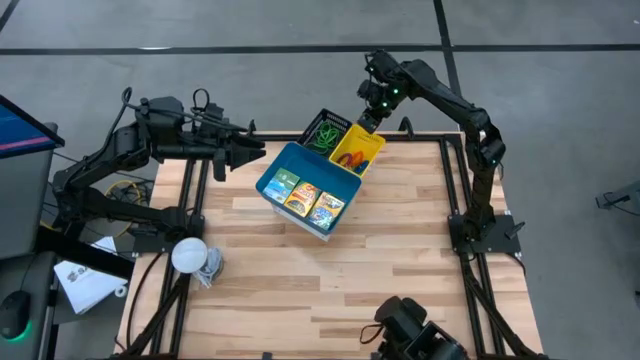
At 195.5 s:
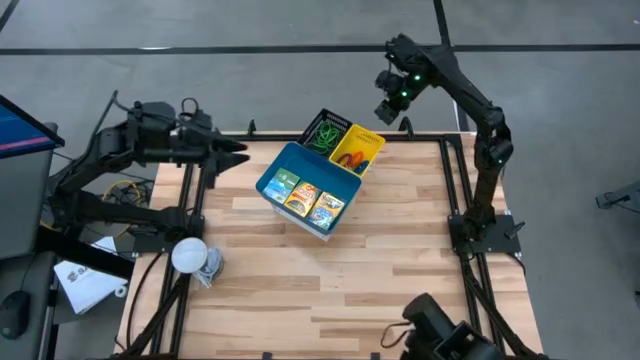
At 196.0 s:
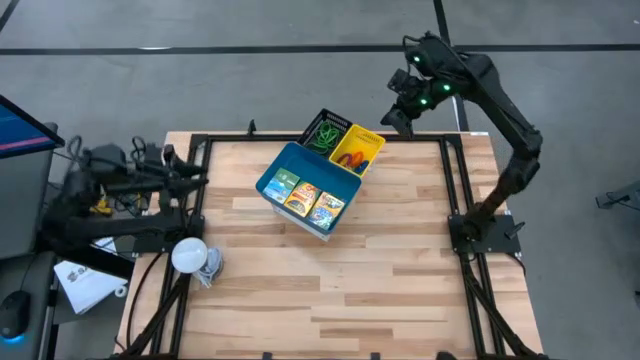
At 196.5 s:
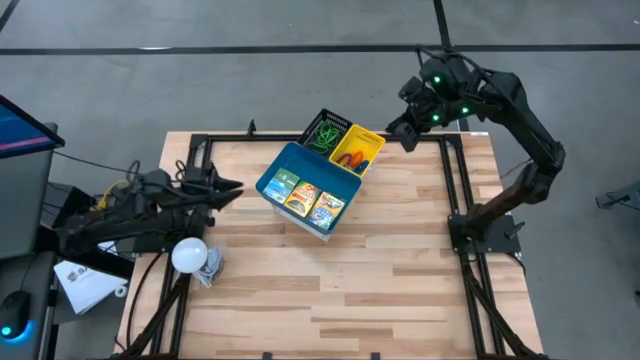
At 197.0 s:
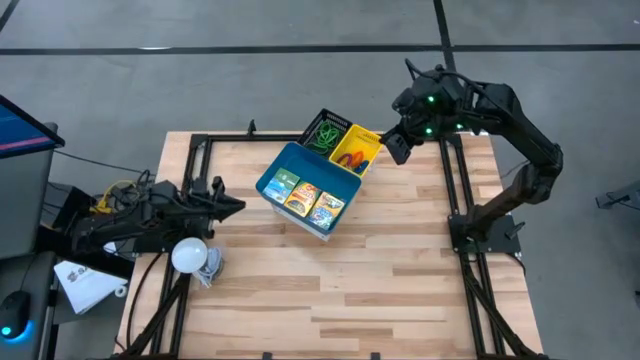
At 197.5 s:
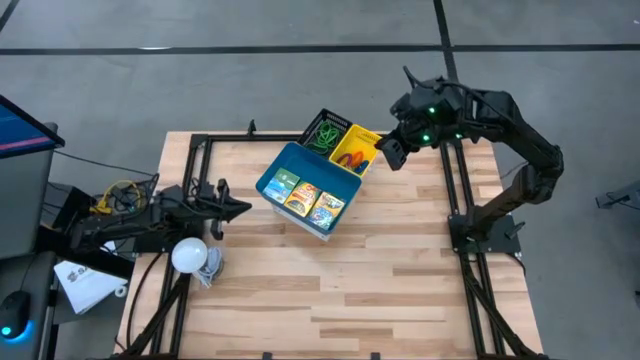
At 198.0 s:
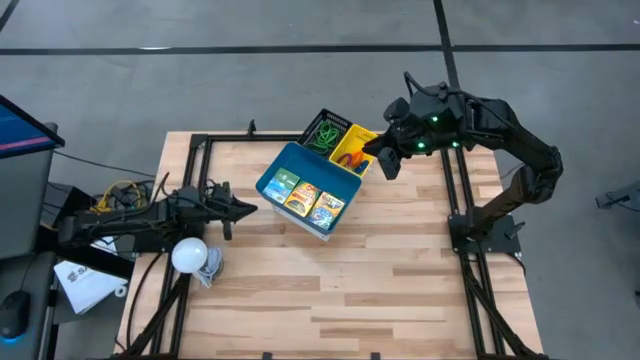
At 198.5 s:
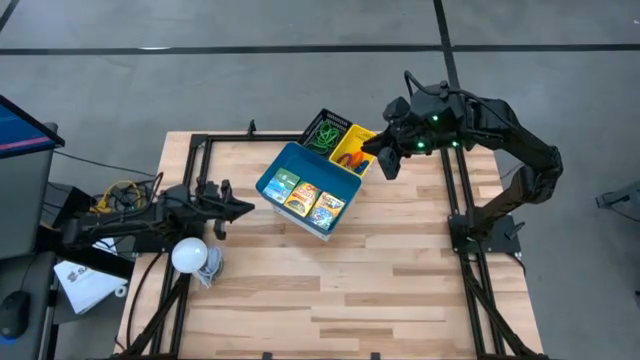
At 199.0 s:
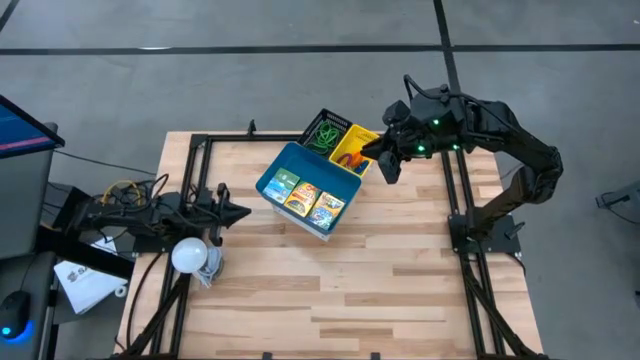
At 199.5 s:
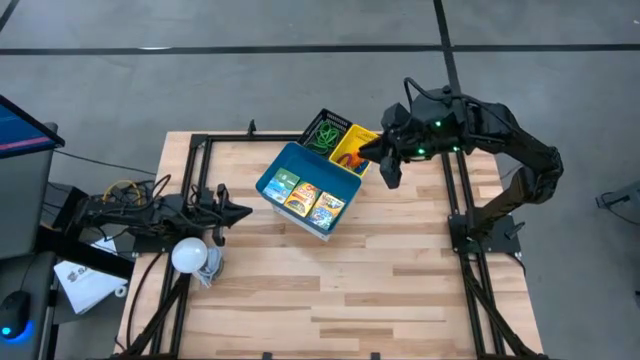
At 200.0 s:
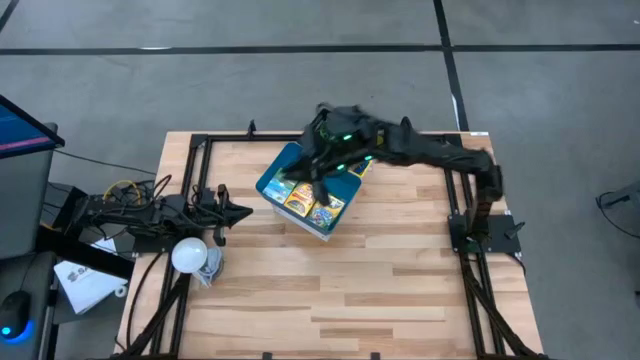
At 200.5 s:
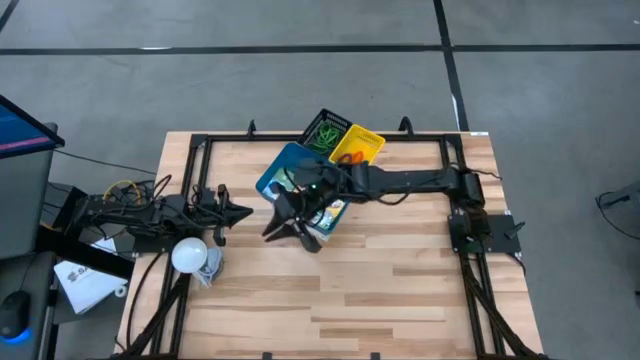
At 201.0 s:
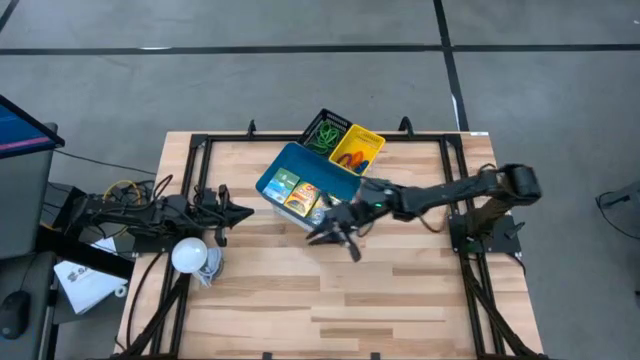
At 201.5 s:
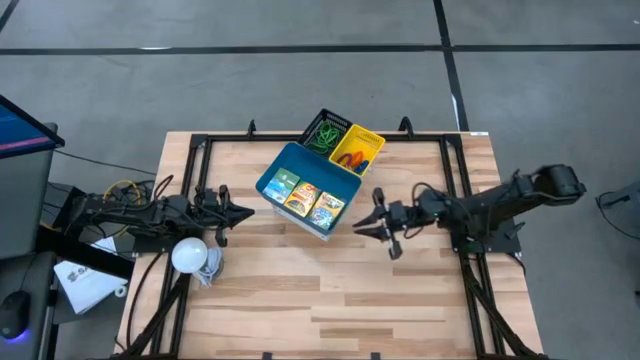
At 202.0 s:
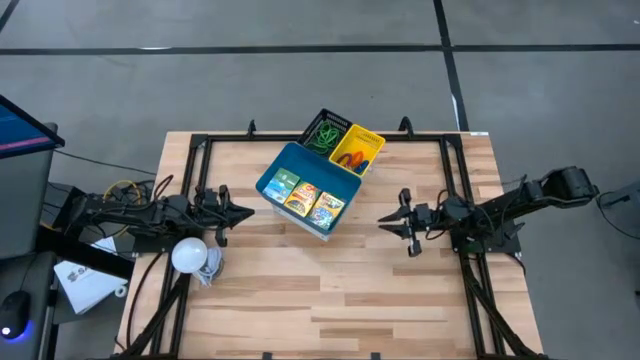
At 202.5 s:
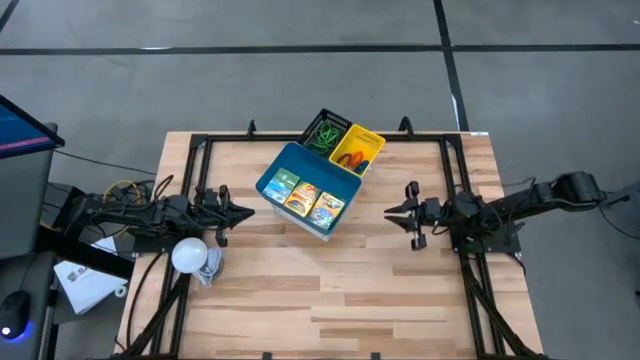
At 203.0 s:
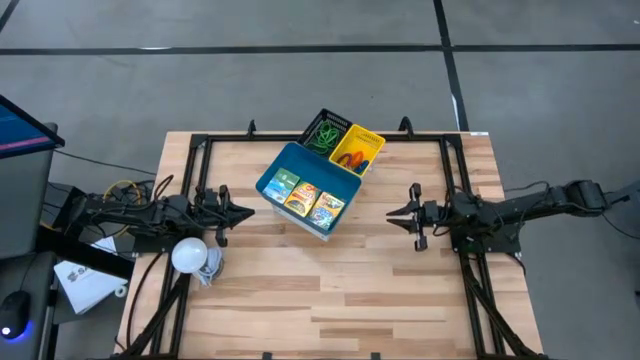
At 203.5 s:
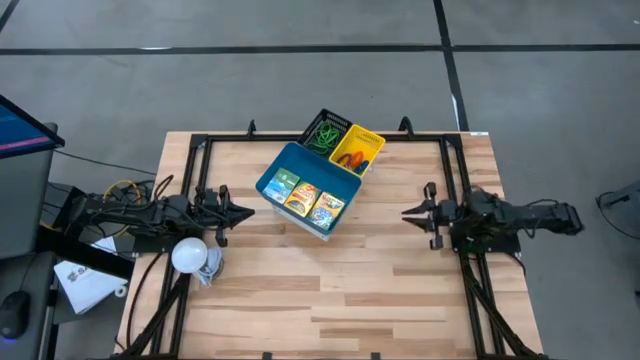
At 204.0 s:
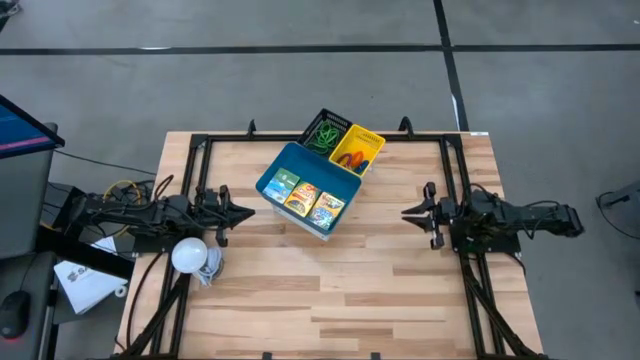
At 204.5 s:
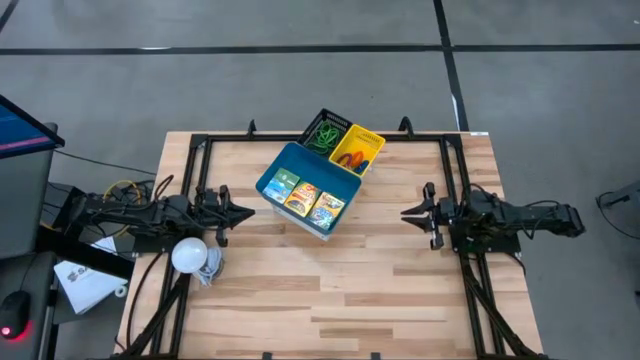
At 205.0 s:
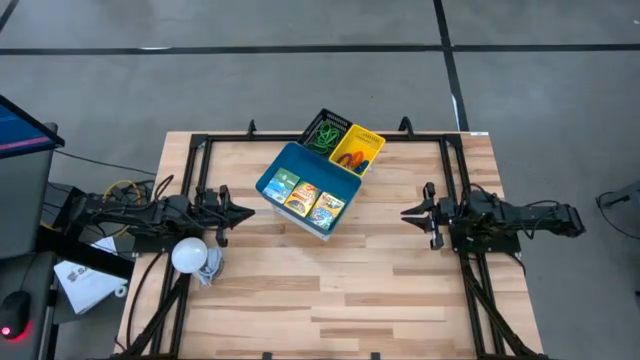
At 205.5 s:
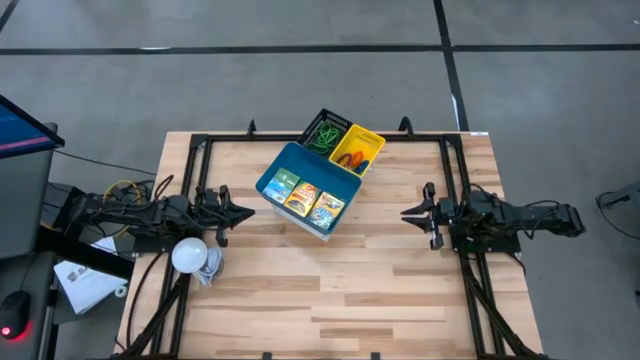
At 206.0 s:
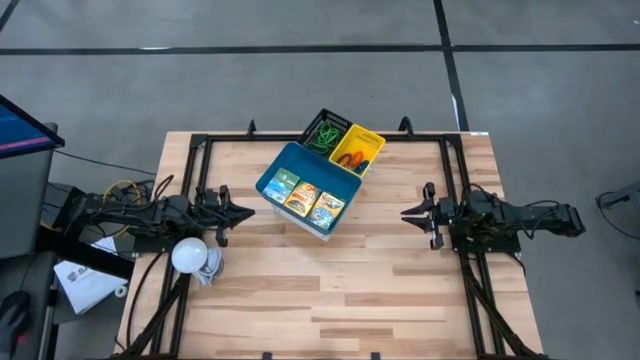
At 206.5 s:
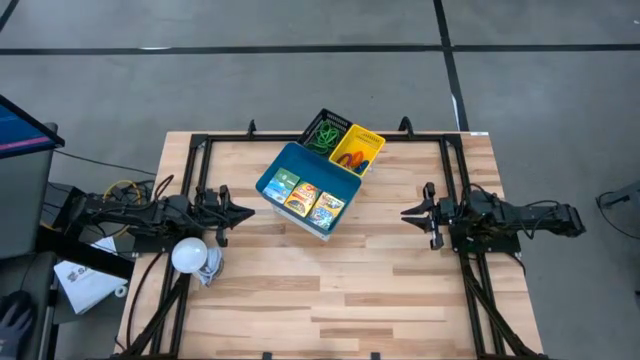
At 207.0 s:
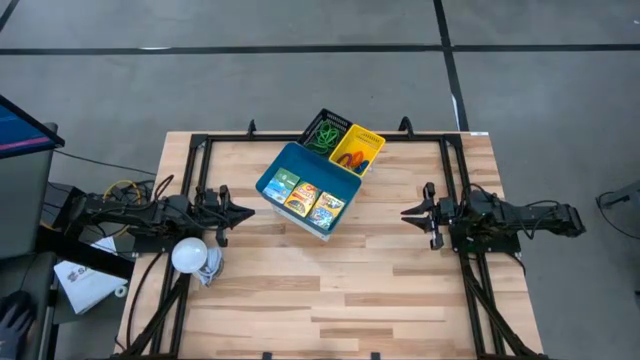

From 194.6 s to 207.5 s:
Task: Pick & Place Office Desk Supplies
Return to Home Position

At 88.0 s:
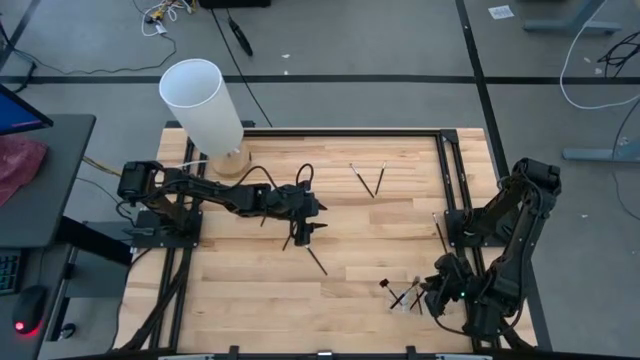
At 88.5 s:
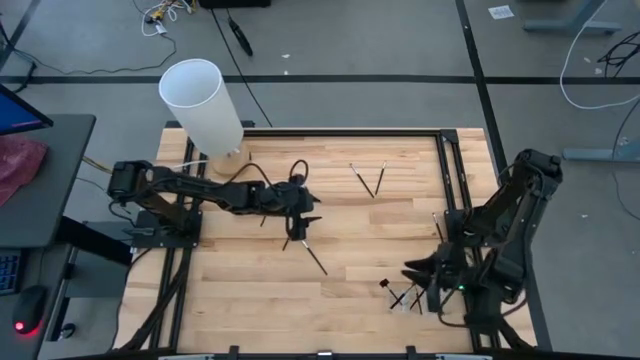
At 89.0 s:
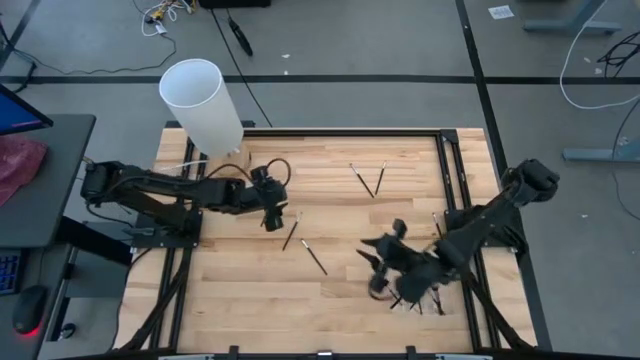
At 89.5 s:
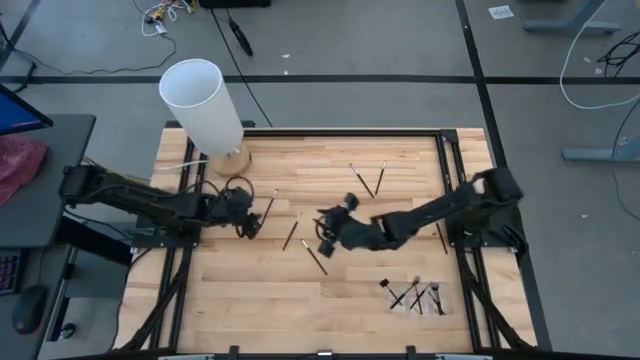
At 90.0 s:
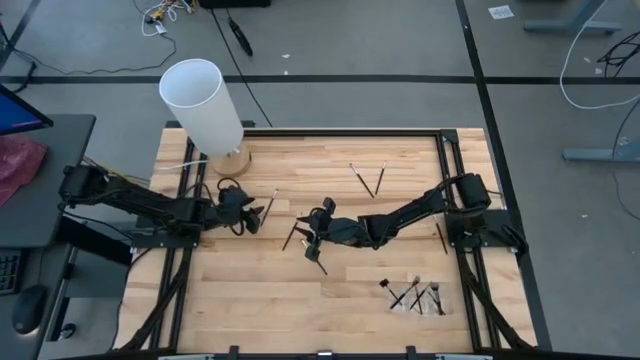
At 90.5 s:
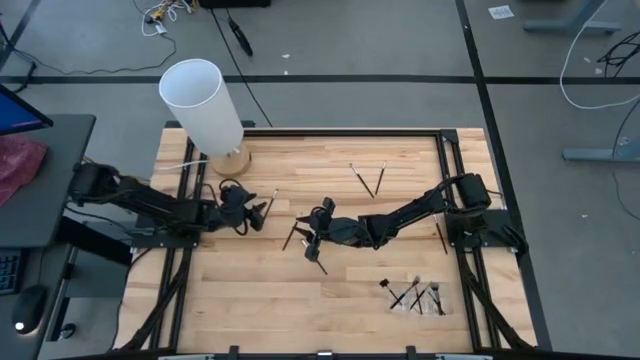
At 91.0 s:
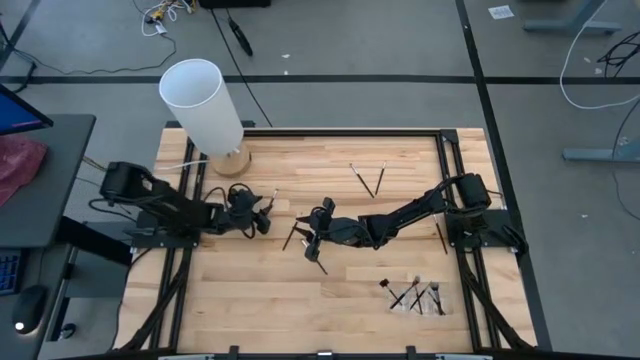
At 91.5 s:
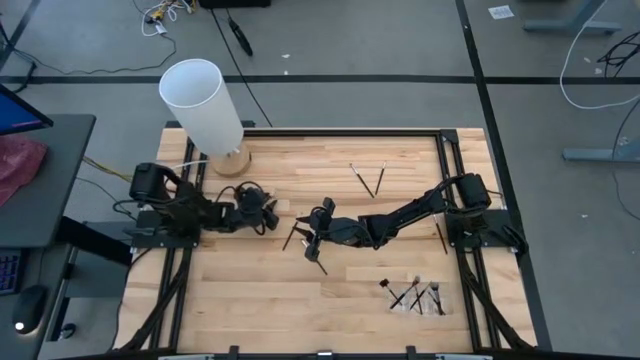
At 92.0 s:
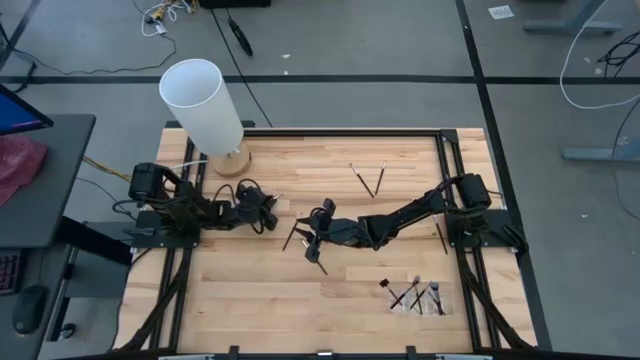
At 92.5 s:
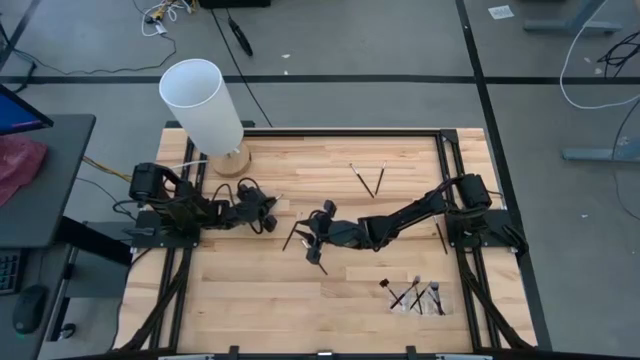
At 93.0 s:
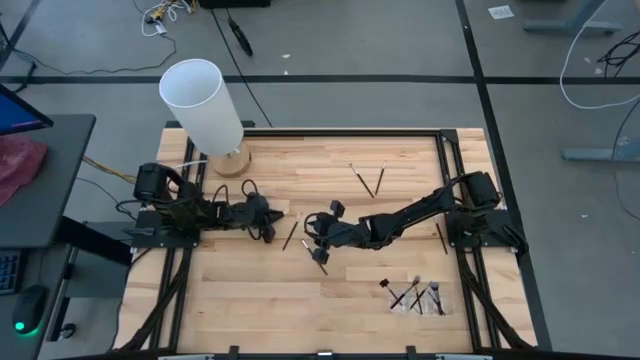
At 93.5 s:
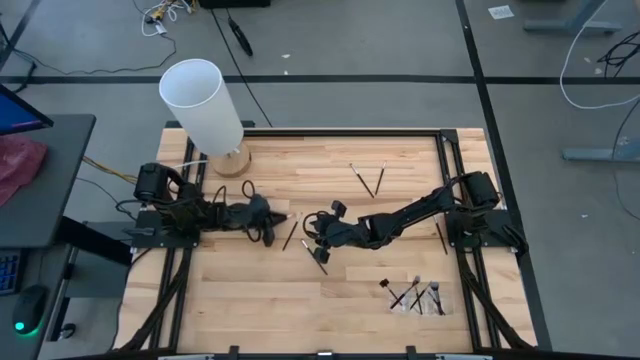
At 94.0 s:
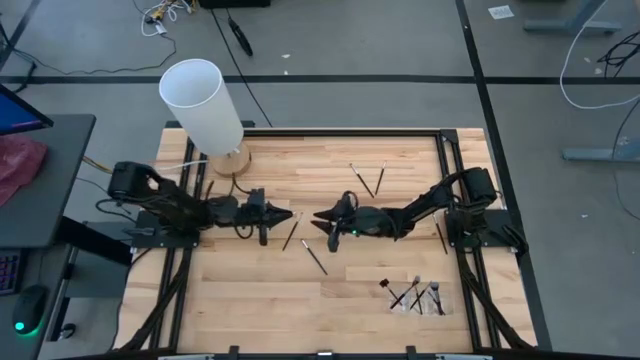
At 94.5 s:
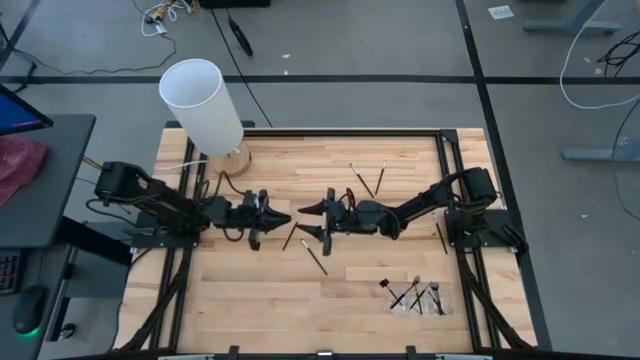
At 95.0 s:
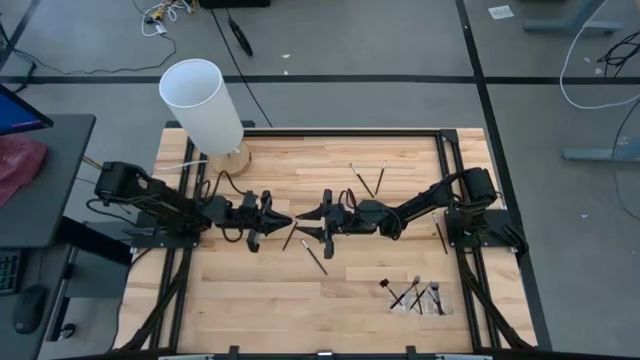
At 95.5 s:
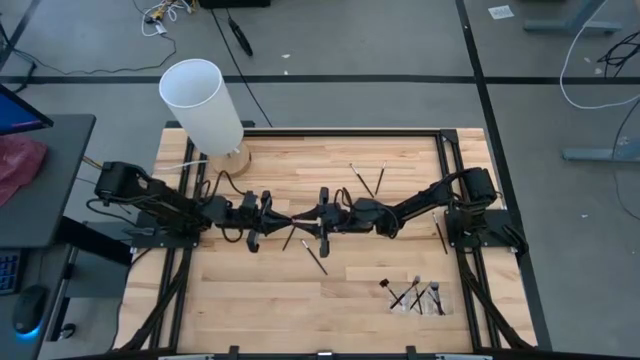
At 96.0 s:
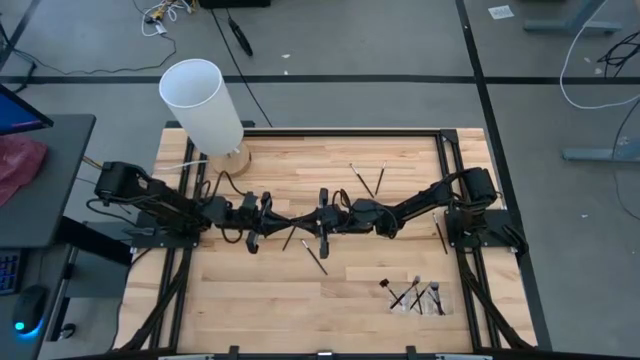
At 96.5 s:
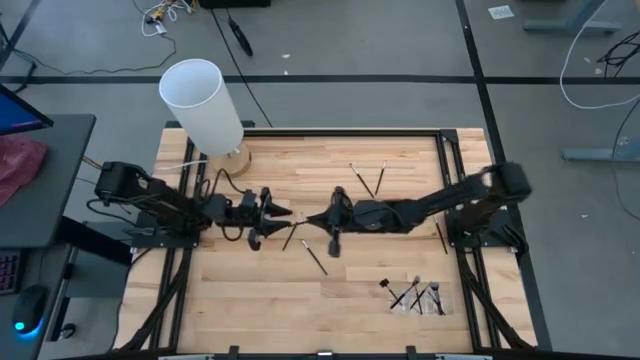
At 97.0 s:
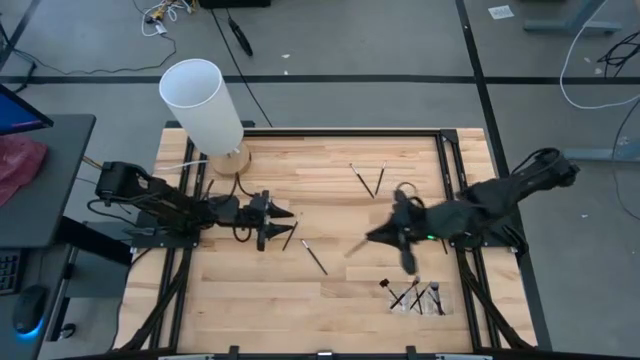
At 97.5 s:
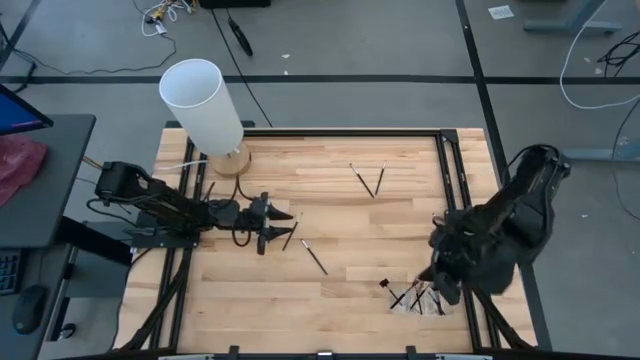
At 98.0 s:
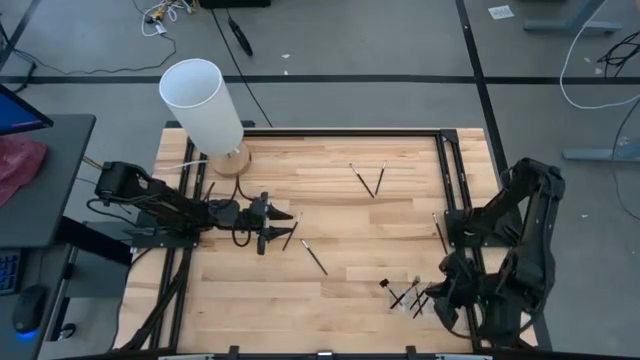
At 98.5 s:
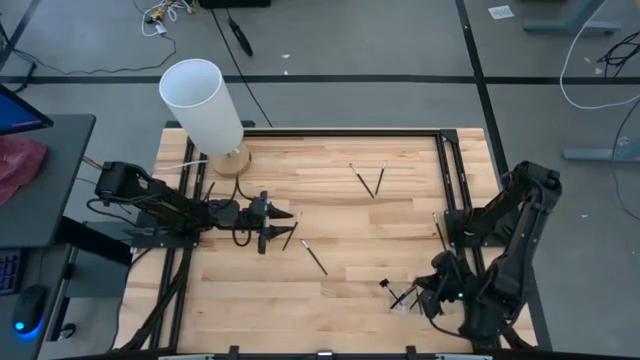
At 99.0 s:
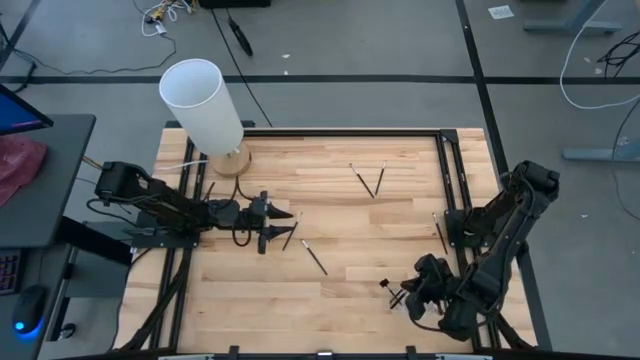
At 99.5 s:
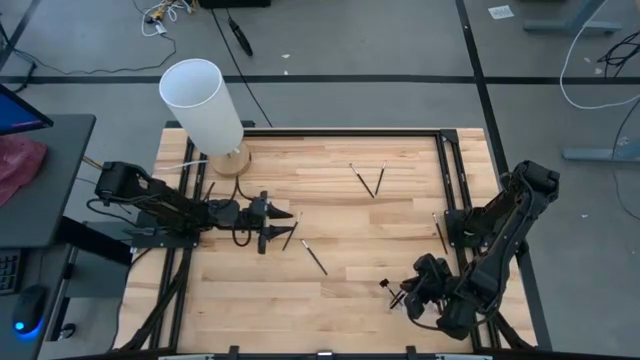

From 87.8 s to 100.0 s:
Task: Pick & Place Makeup Supplies
Put the silver makeup brush into the transparent organizer
